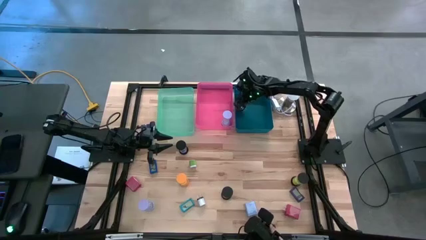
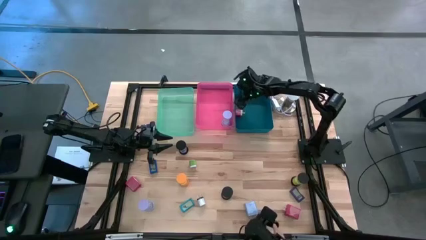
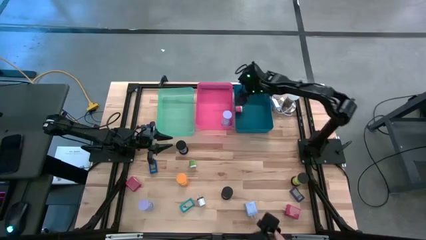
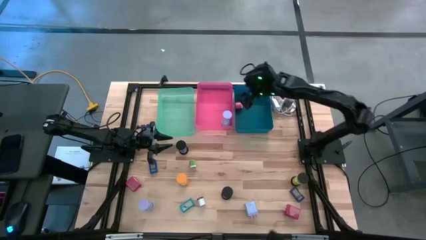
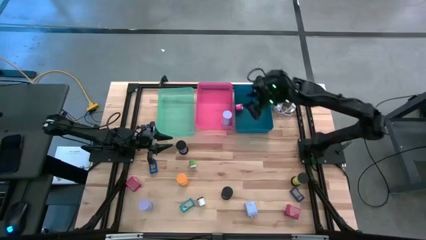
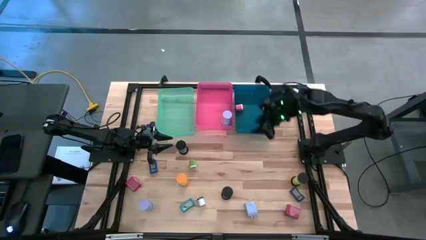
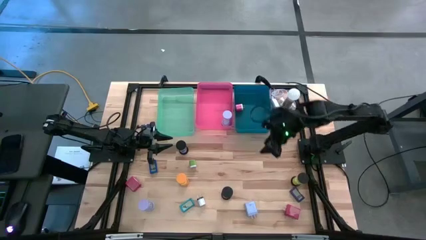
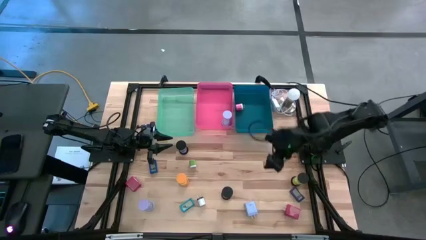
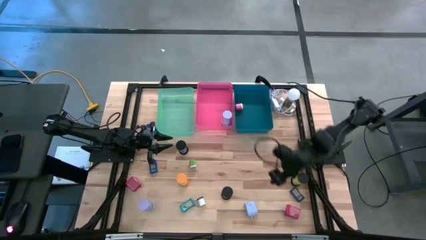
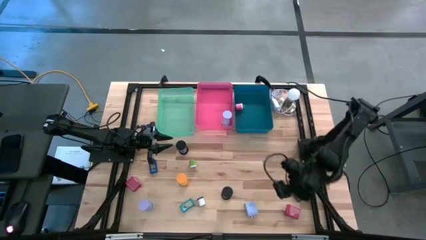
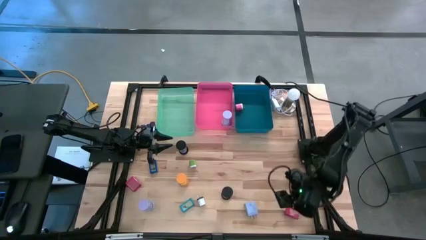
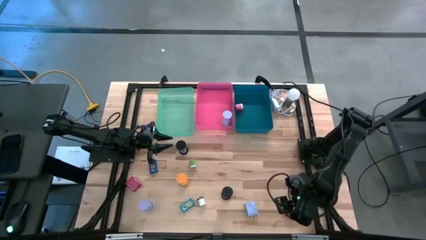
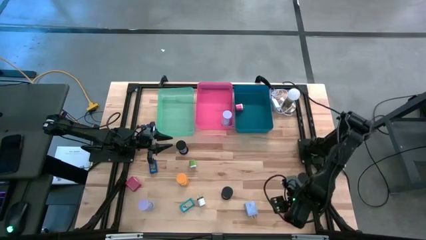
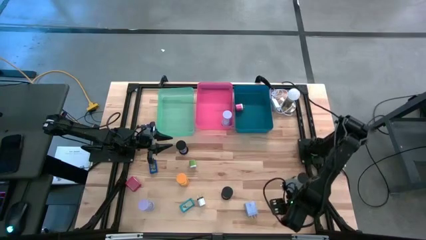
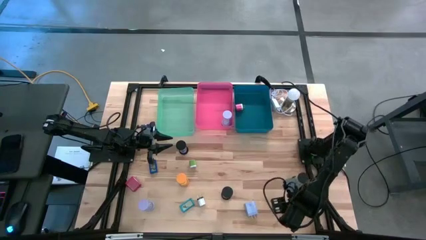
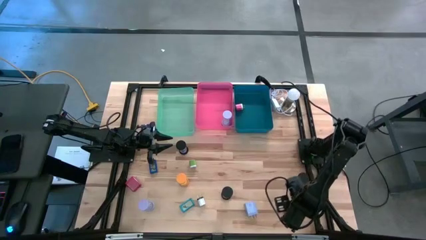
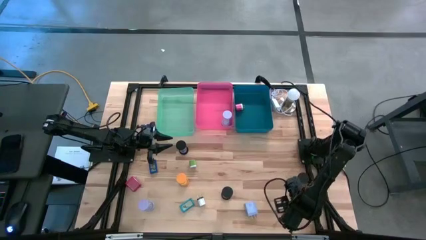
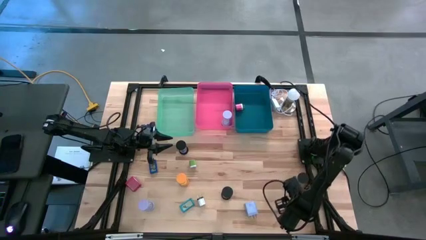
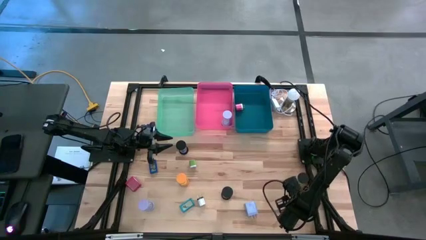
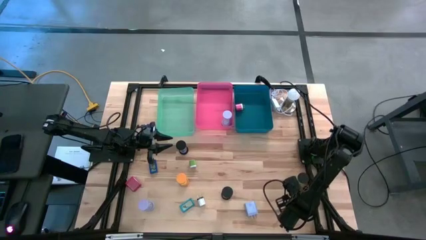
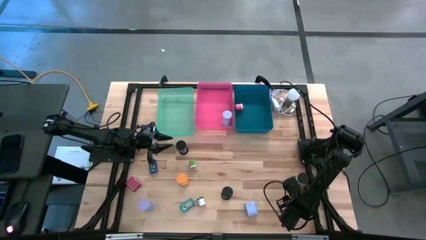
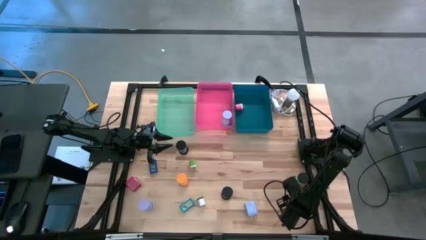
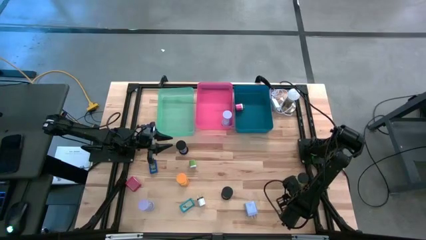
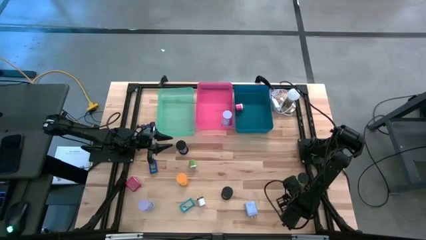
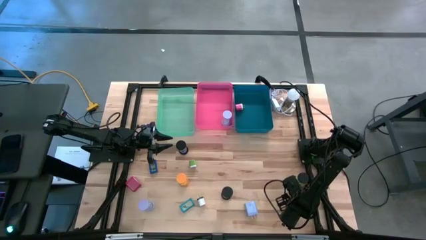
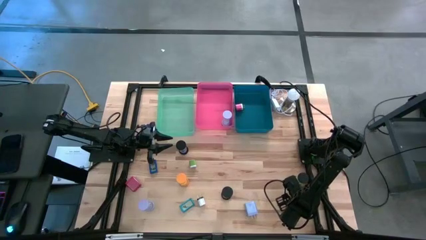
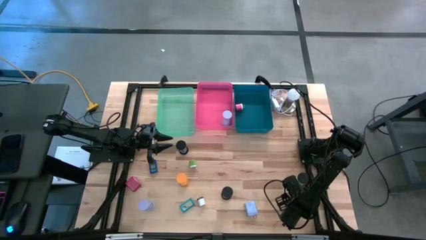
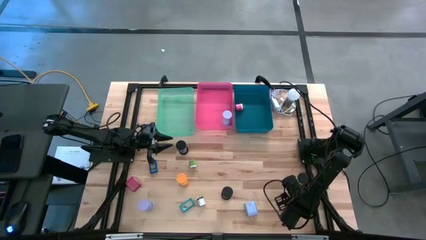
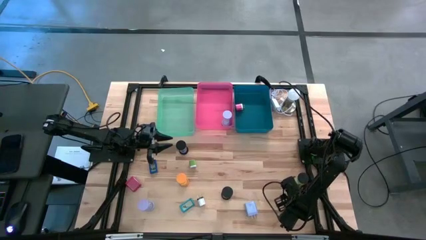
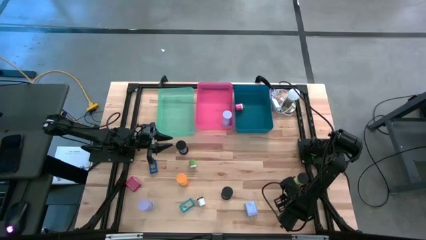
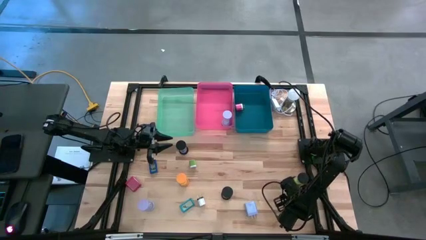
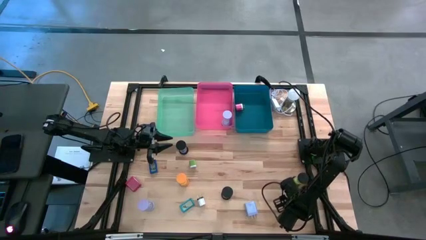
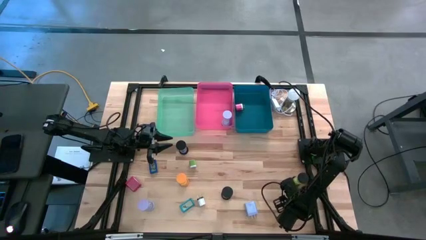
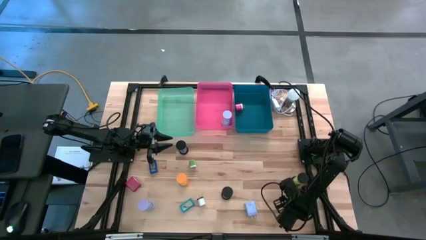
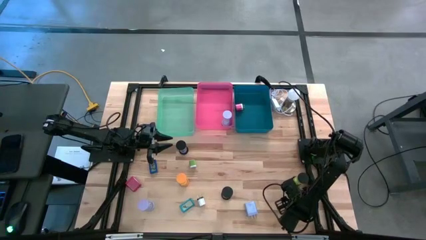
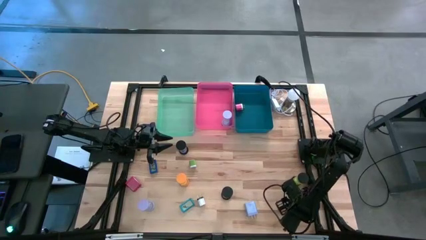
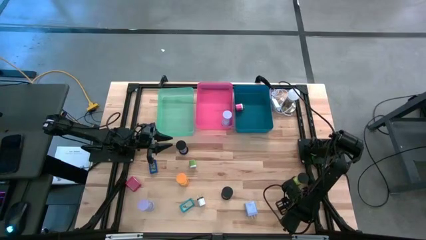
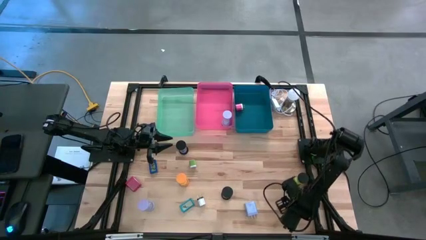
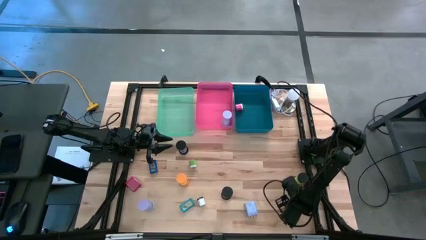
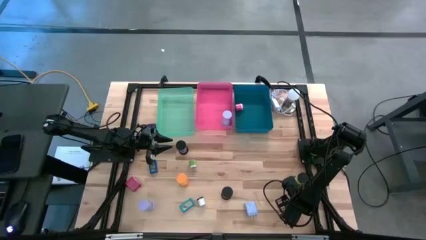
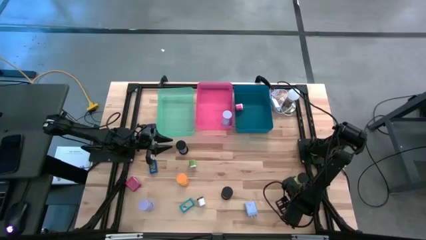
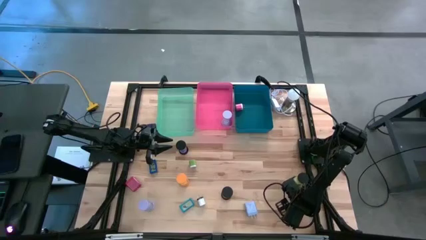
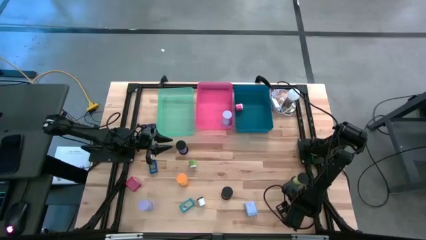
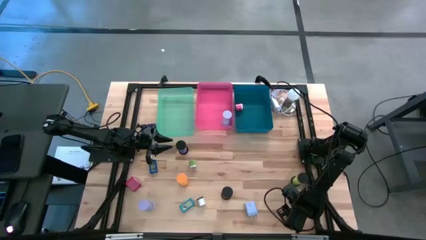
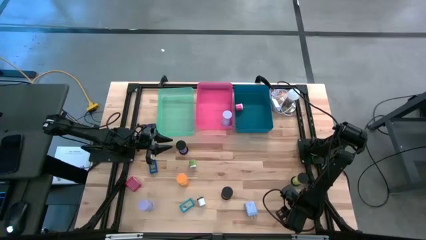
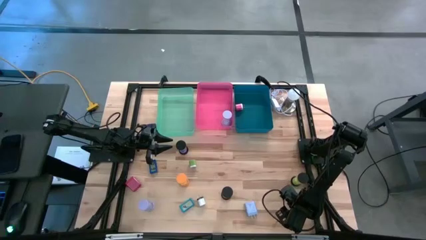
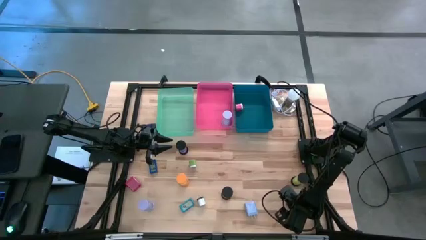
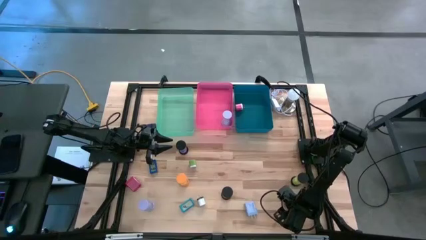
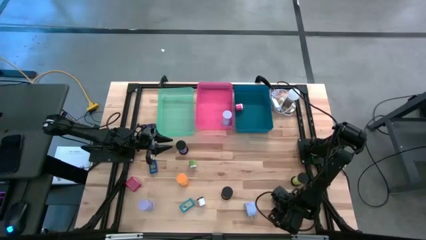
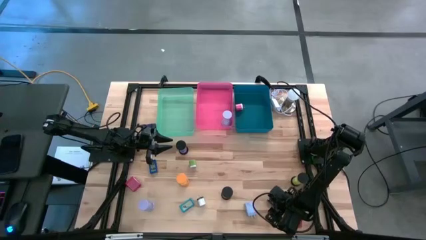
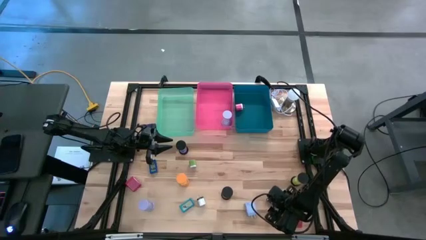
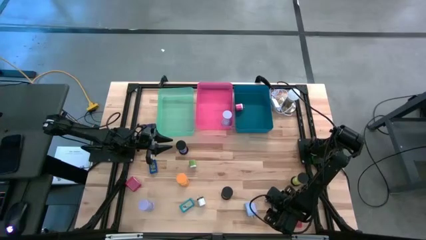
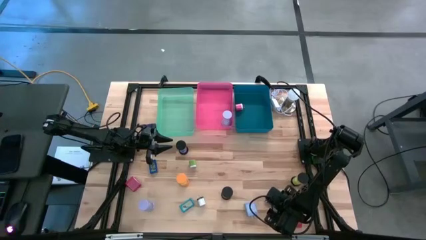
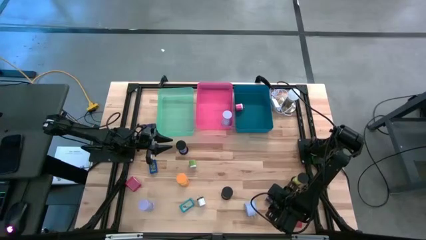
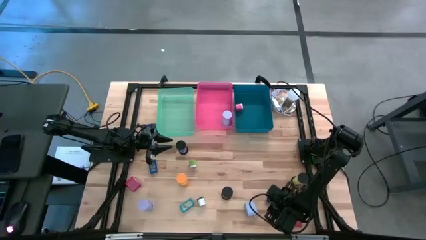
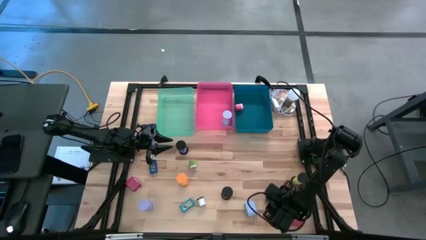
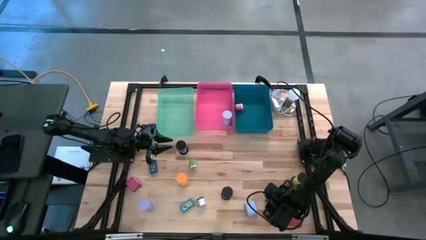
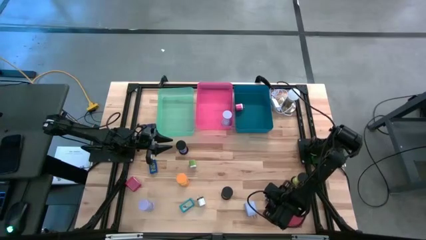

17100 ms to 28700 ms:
Task: Pick & Place Office items
Put the right purple digital clock into the green bin
